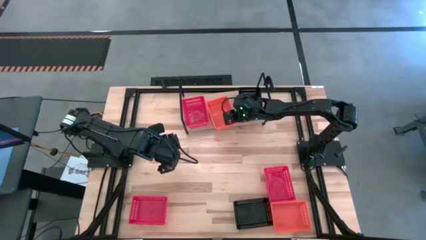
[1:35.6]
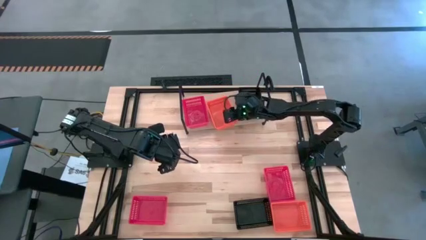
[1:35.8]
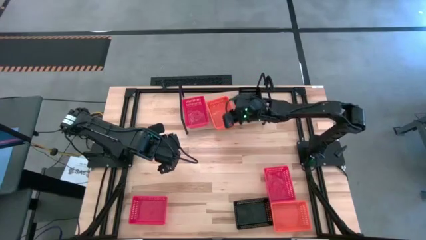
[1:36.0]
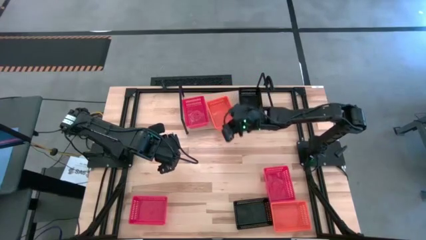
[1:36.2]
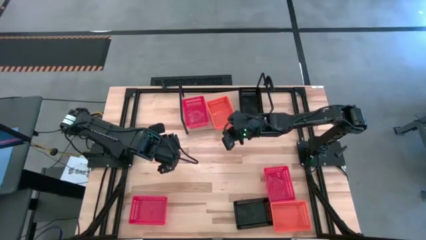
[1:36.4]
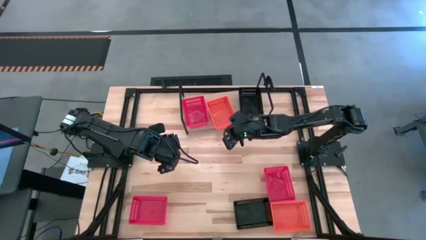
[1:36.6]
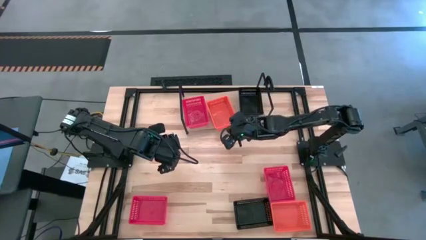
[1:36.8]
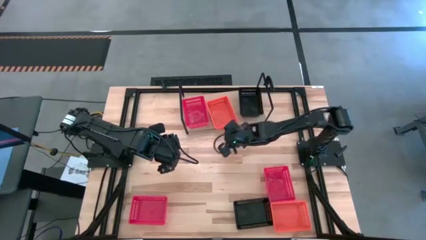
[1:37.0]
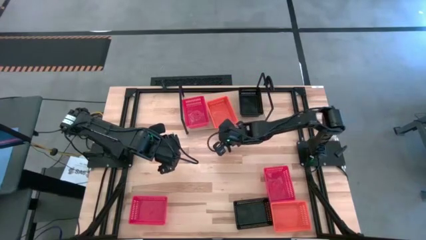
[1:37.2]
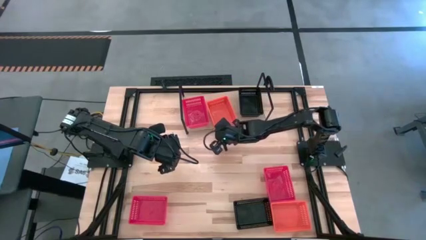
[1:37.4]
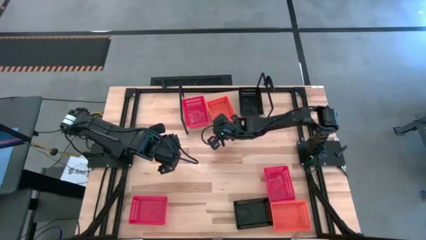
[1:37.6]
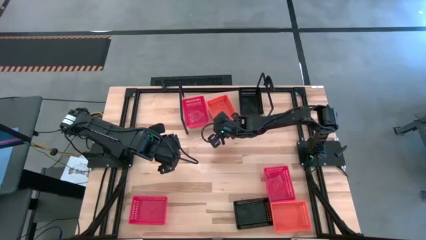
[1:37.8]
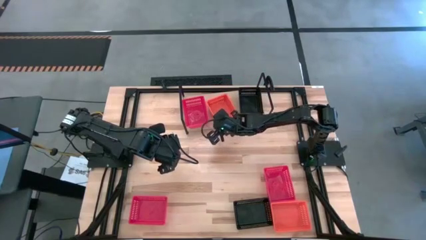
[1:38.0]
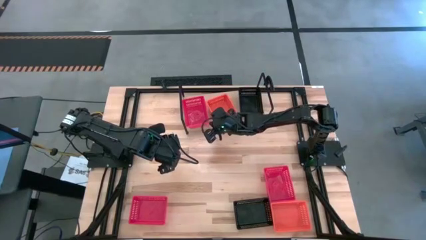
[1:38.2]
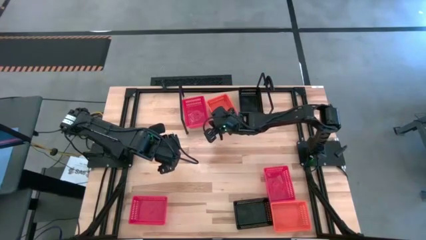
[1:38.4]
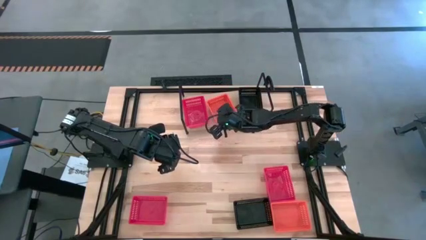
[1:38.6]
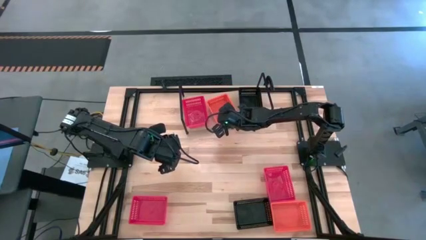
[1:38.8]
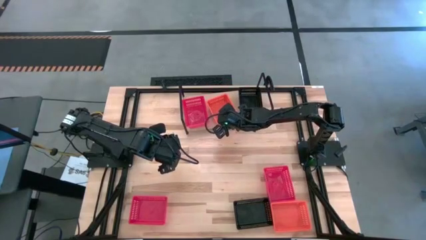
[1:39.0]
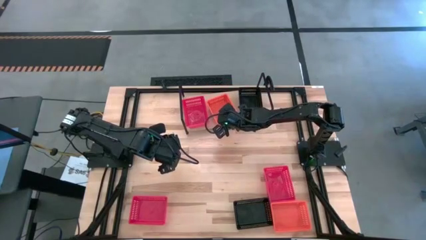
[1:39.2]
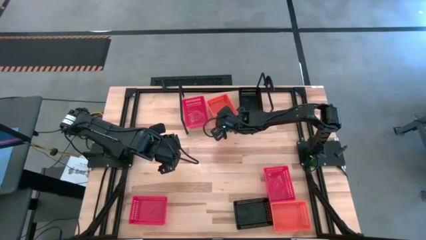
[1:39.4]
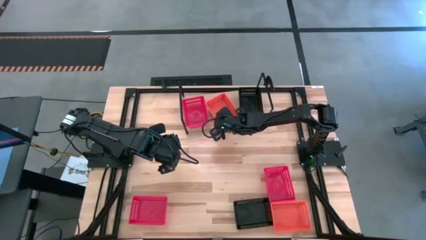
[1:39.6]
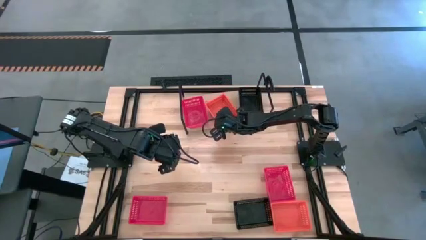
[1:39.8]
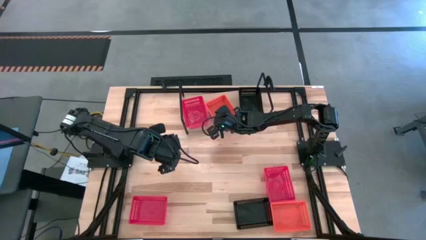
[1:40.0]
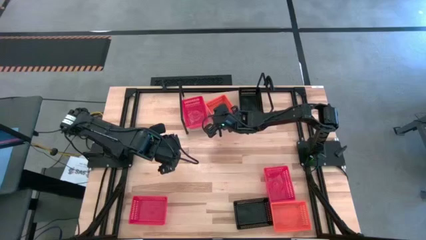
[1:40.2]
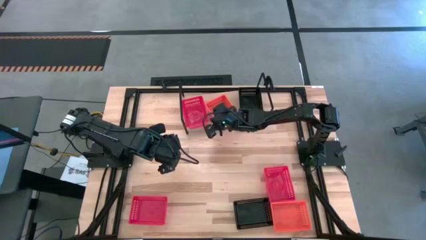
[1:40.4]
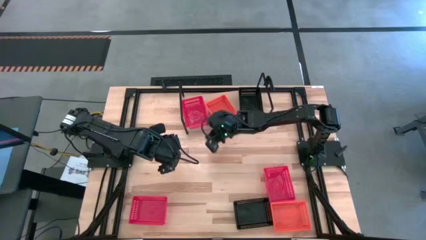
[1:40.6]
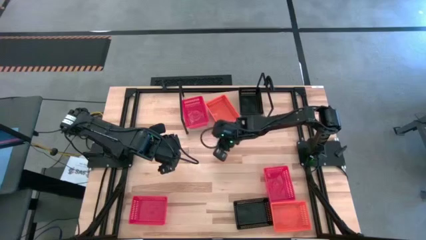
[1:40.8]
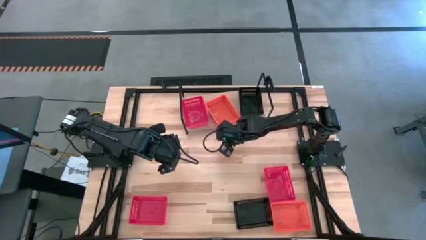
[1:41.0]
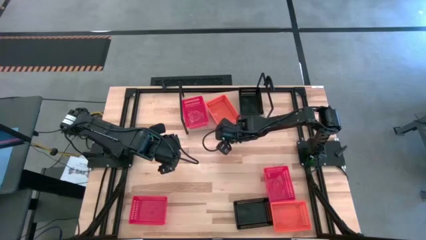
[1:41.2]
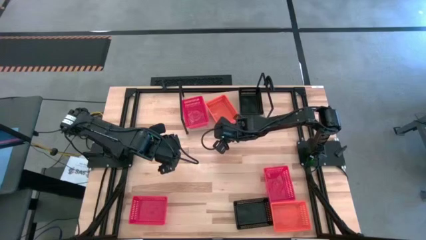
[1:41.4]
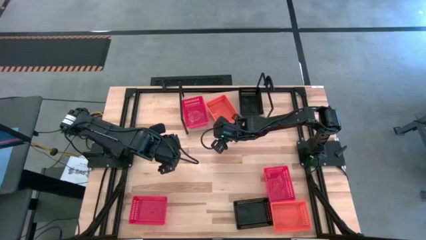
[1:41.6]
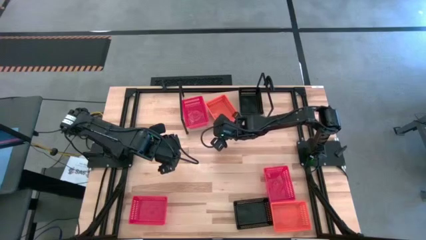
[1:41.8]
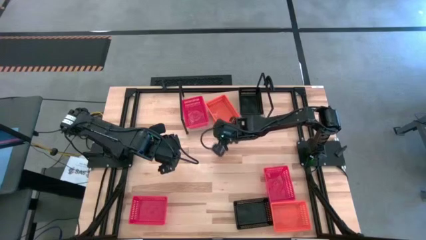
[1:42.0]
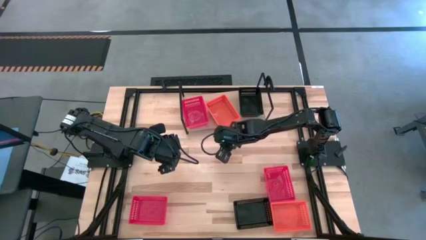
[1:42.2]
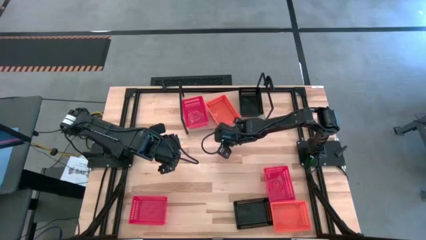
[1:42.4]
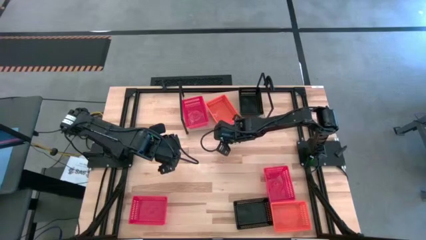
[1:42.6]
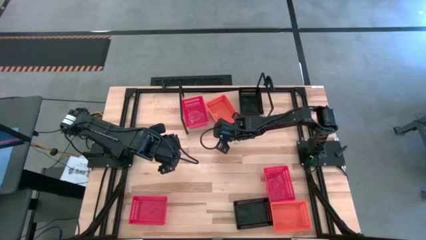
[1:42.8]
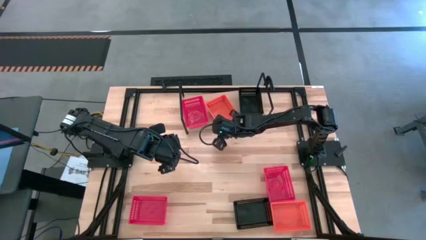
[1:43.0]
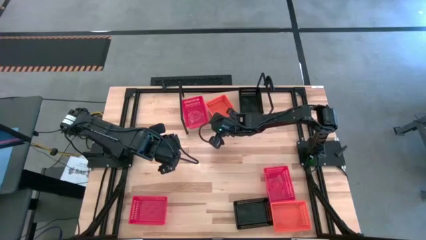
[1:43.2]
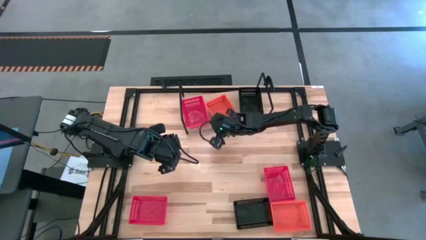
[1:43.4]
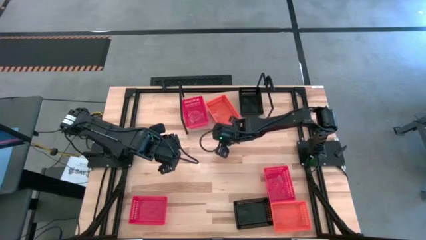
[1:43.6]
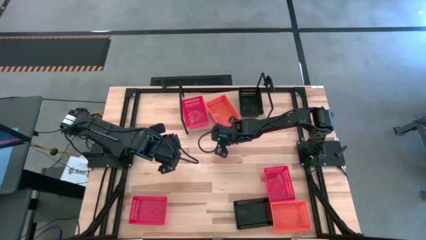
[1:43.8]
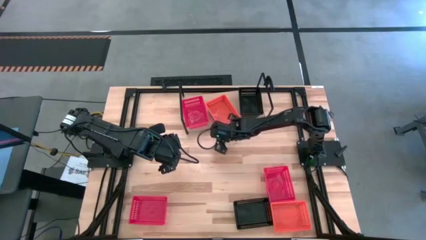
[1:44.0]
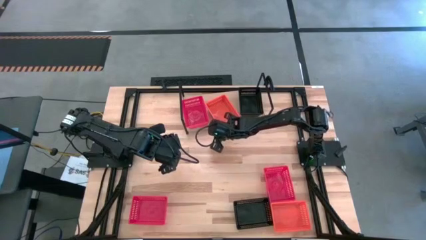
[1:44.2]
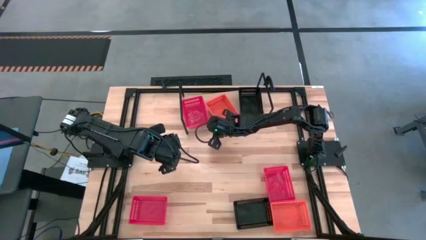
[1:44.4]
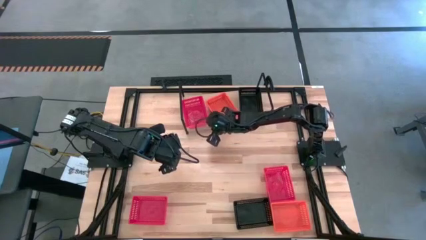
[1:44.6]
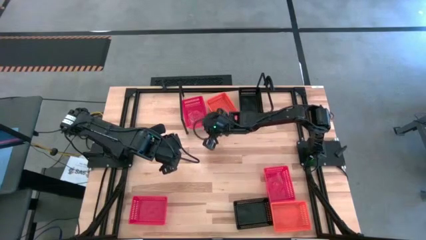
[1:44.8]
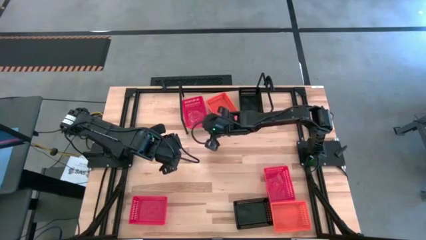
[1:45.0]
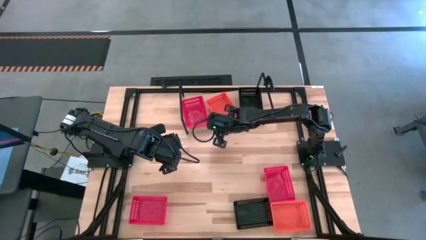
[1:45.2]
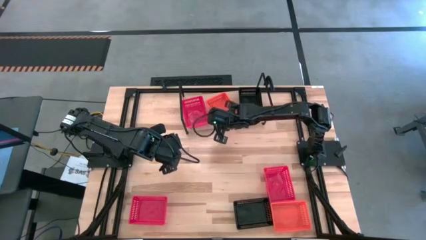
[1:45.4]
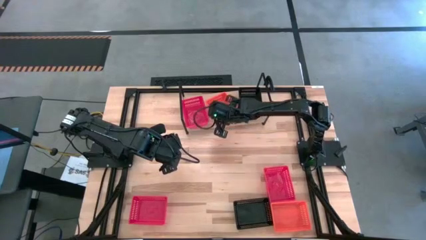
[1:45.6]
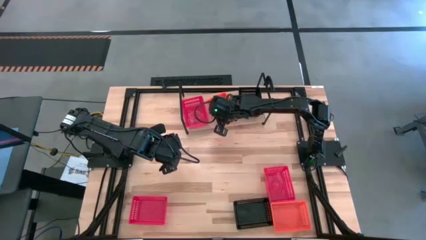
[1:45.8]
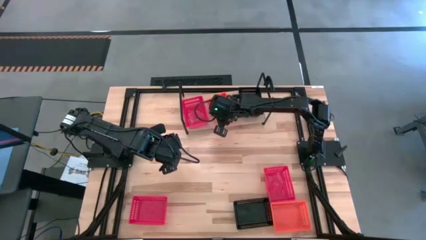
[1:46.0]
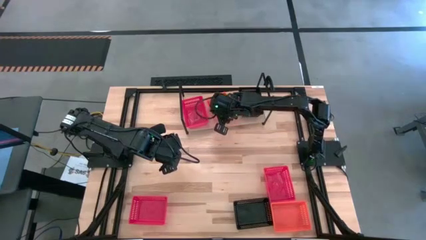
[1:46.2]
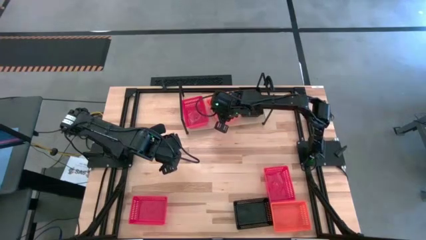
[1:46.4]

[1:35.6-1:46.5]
Task: Stack baskets on shelf by color
Adjust the bin on the shelf
